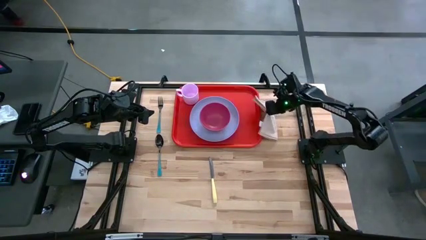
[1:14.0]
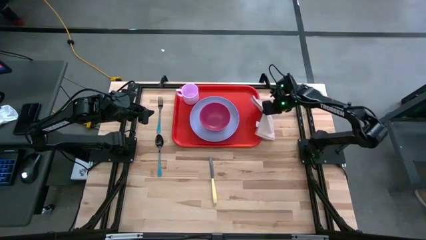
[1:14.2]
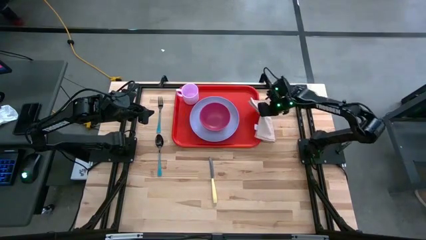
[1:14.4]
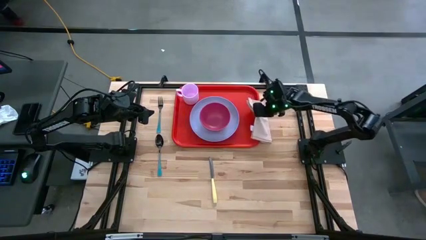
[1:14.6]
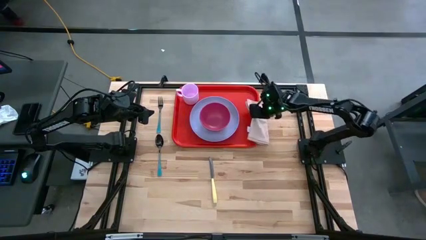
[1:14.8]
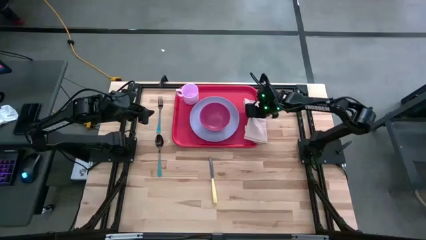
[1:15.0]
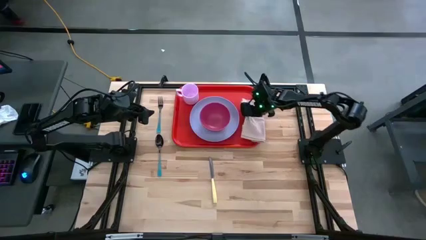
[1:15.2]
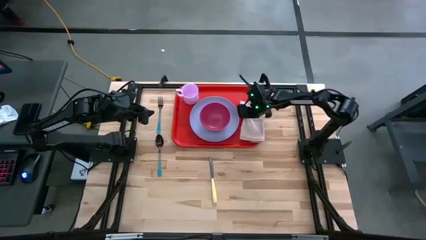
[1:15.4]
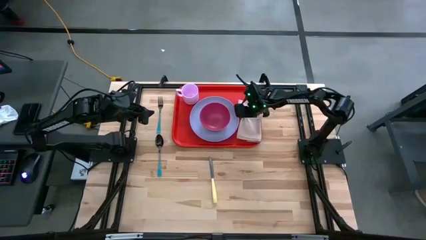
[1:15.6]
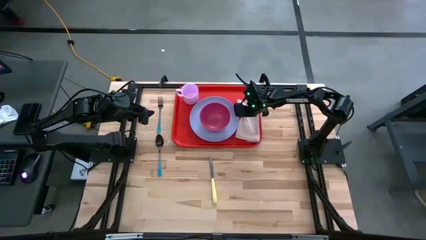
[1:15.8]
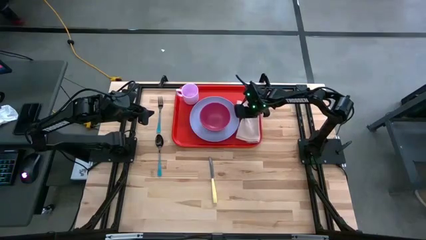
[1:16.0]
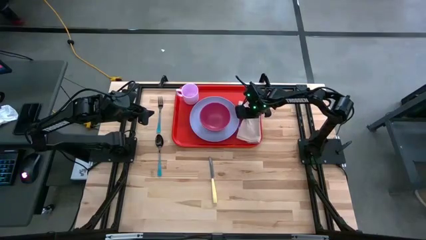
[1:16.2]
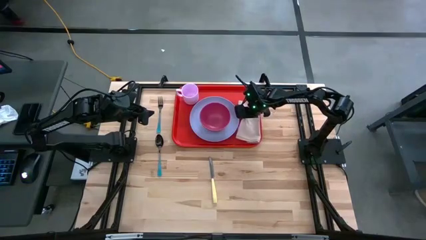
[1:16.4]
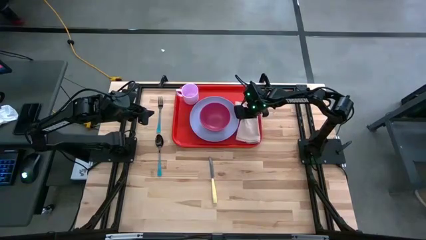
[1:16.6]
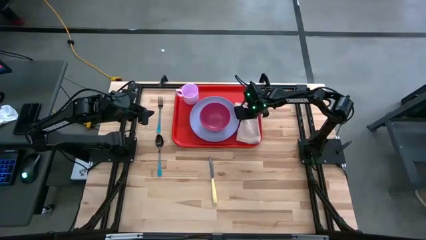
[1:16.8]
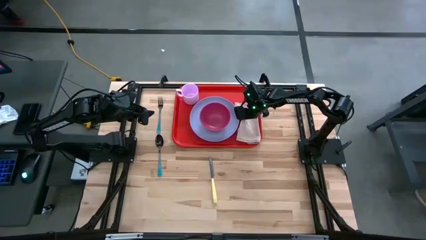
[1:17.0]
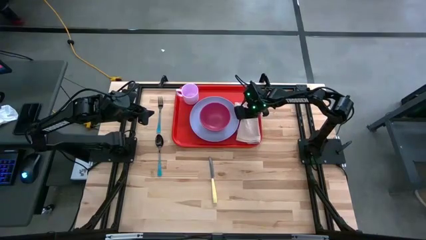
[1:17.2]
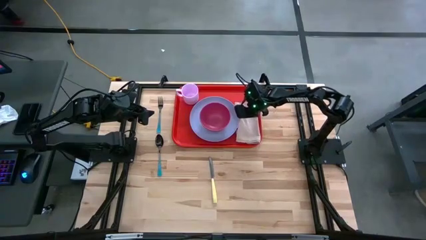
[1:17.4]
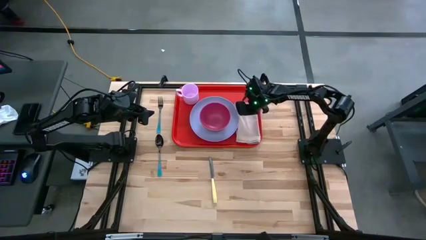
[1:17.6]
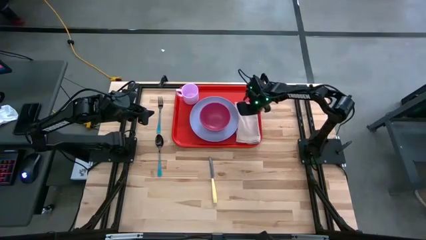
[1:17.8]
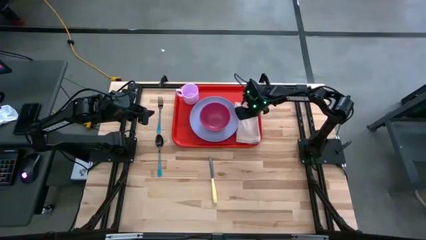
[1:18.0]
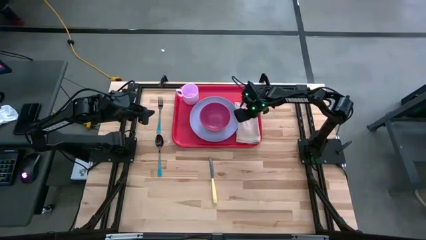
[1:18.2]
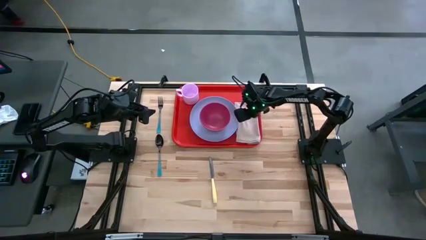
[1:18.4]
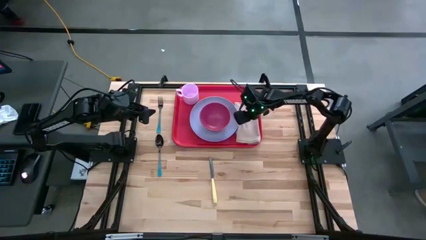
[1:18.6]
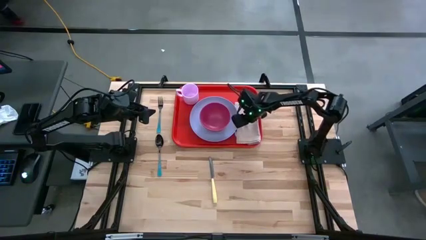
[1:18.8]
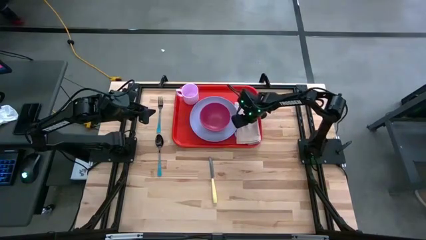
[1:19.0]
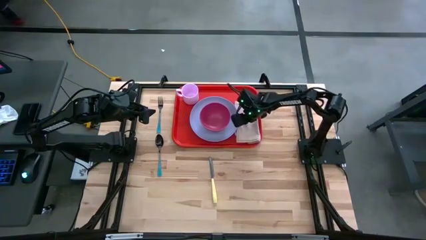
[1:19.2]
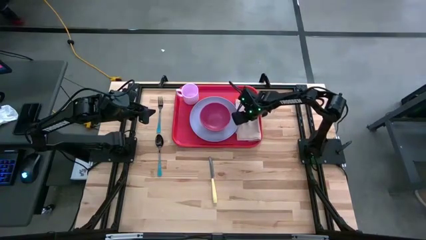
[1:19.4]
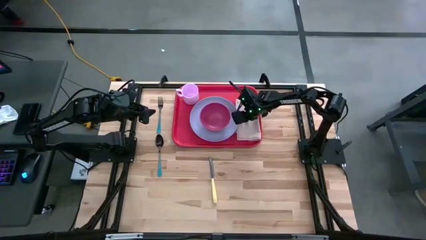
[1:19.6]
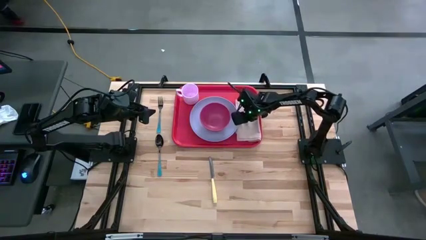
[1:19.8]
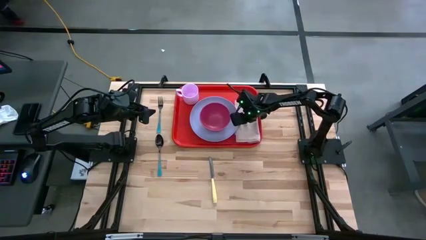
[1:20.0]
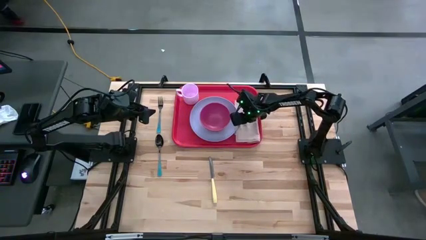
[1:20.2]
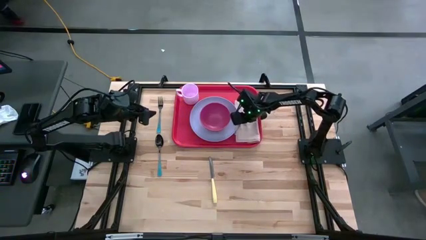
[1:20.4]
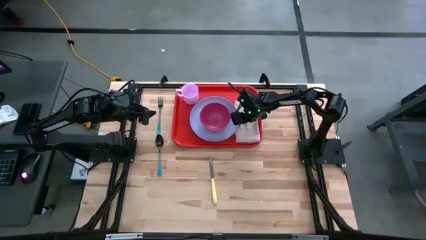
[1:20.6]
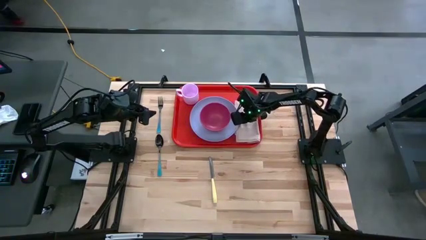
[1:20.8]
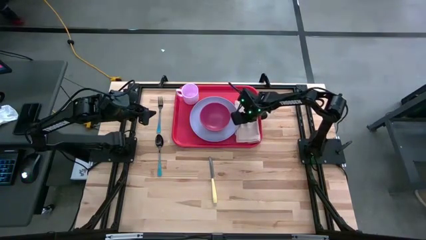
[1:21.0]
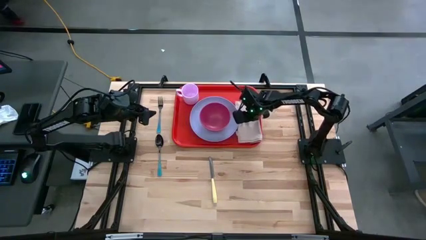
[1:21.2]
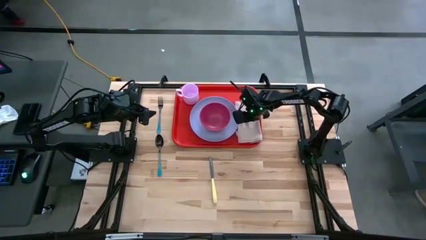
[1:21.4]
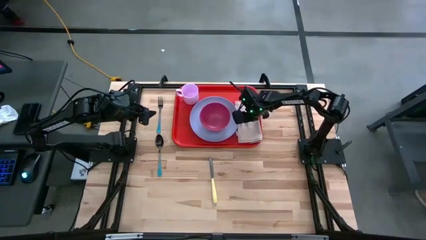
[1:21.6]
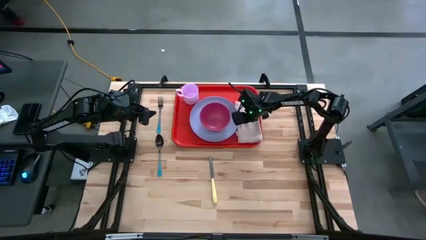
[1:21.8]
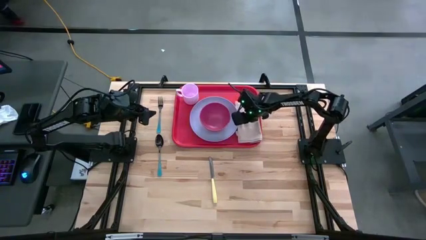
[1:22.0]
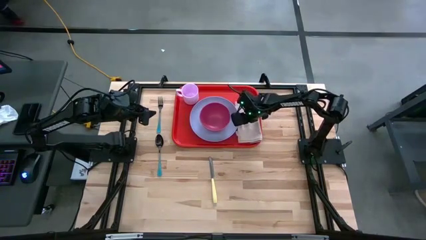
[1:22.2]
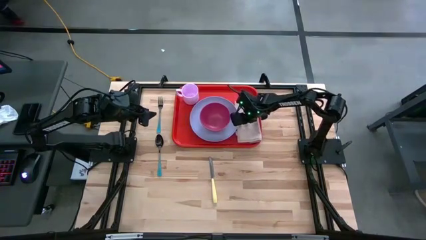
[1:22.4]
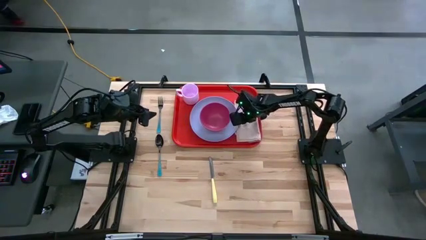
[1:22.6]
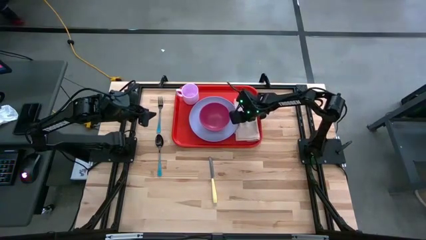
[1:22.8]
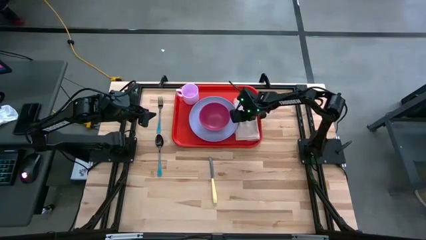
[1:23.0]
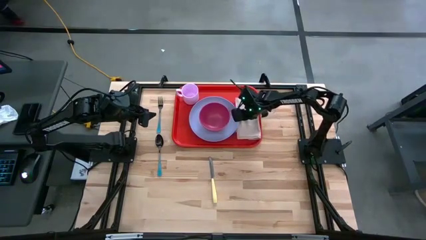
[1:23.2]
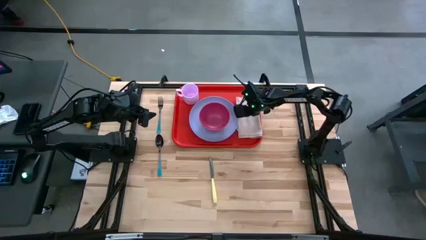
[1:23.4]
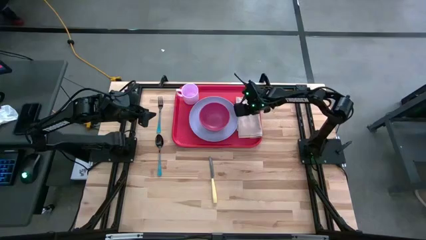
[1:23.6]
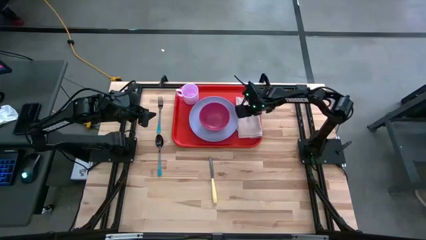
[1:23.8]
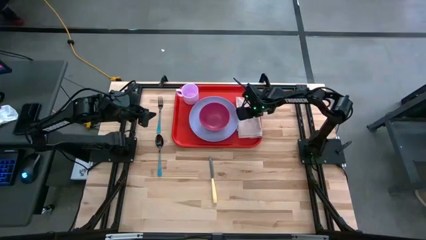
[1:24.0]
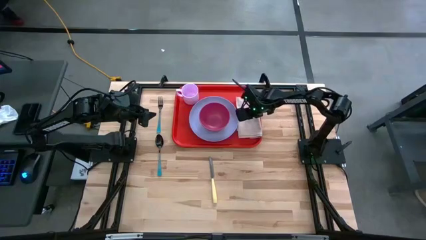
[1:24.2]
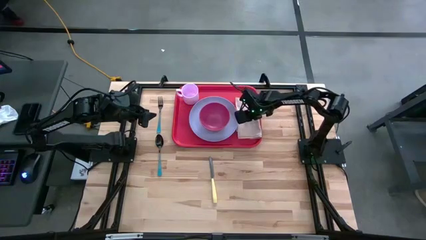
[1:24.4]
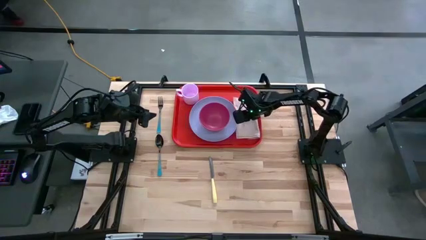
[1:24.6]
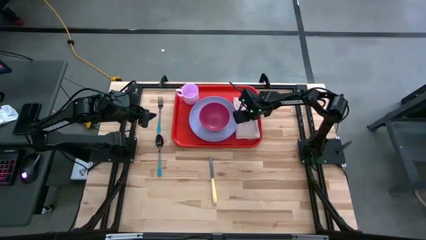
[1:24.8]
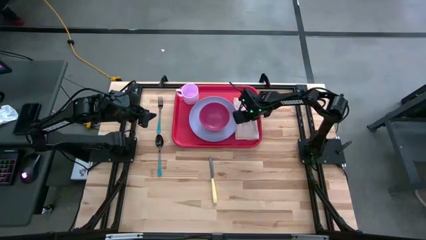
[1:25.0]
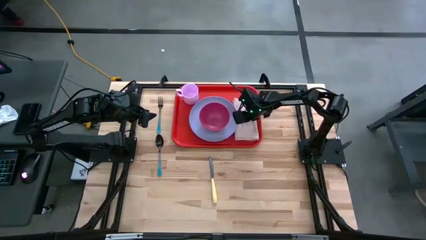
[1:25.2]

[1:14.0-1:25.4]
Task: Set up tray
Put the white napkin on the red tray to the left of the white plate

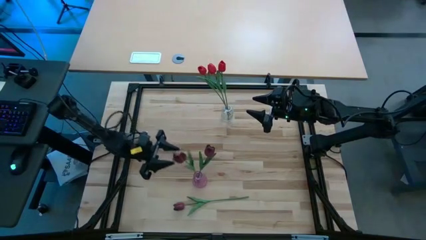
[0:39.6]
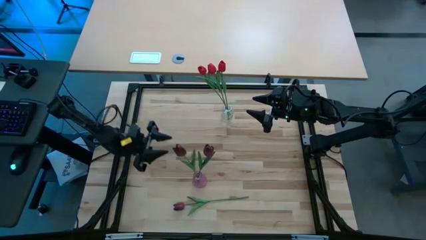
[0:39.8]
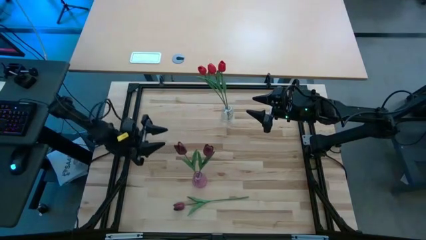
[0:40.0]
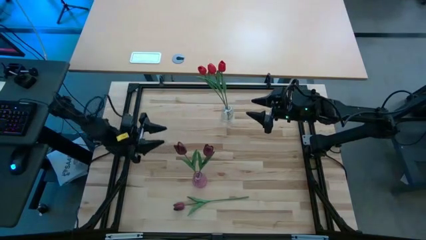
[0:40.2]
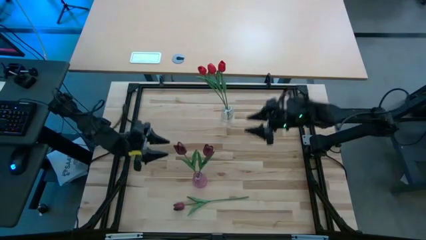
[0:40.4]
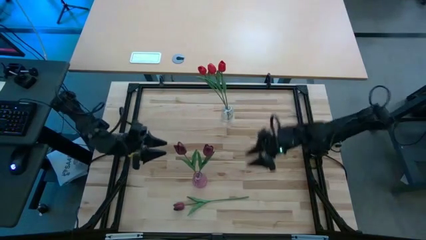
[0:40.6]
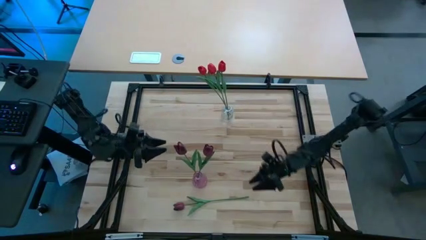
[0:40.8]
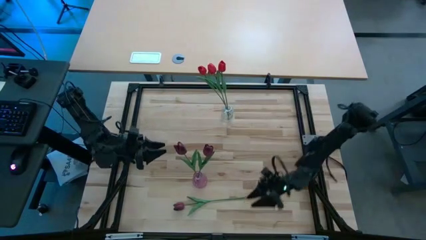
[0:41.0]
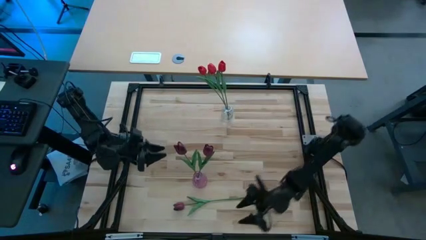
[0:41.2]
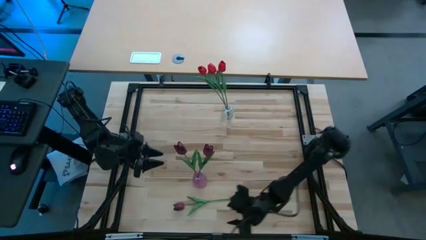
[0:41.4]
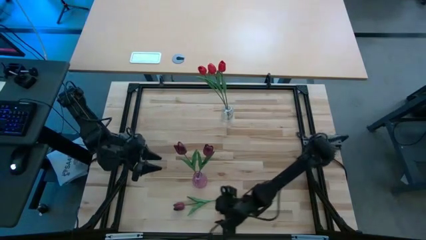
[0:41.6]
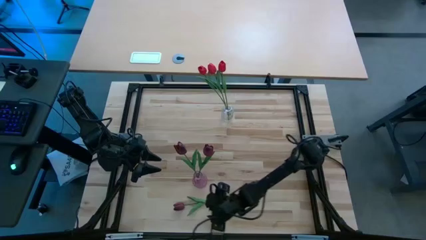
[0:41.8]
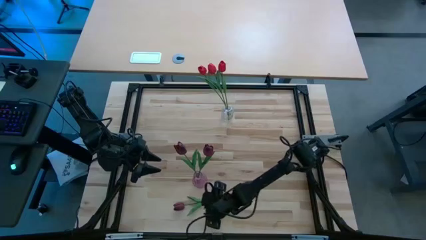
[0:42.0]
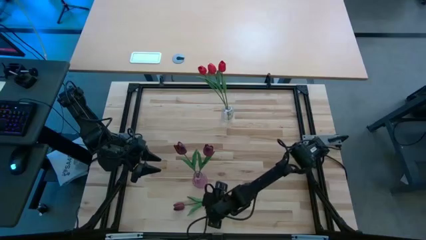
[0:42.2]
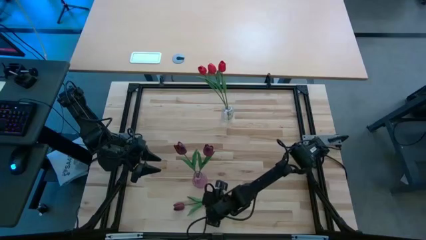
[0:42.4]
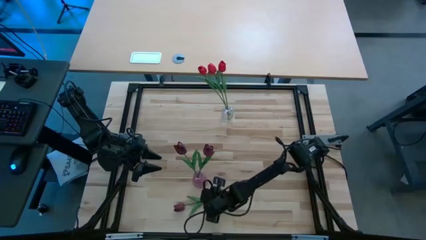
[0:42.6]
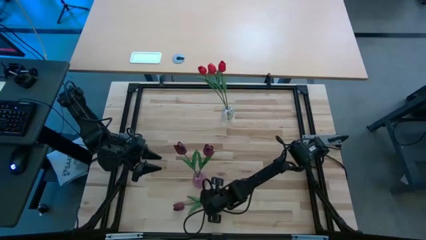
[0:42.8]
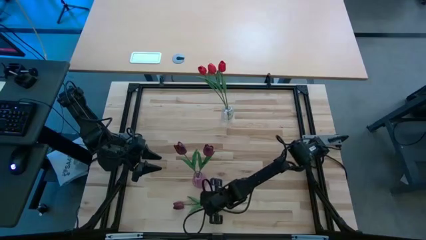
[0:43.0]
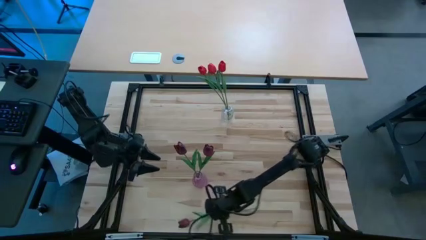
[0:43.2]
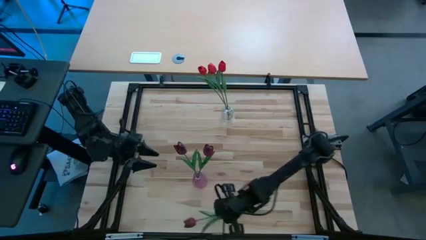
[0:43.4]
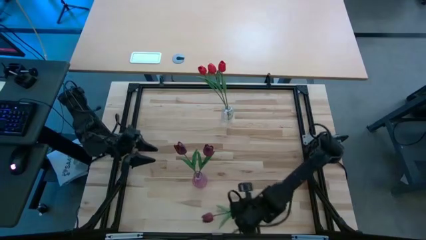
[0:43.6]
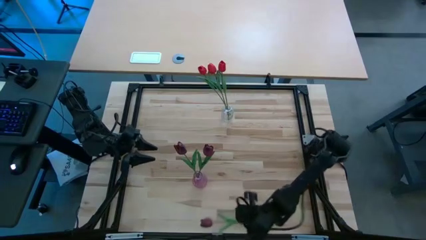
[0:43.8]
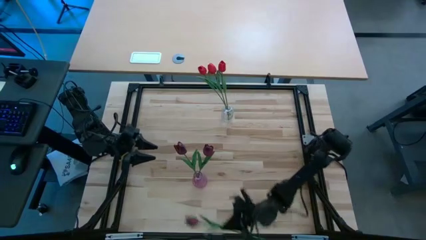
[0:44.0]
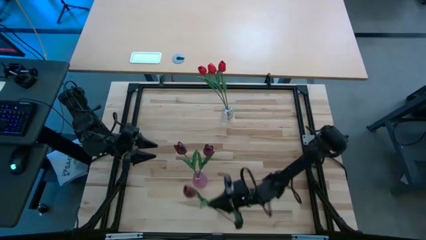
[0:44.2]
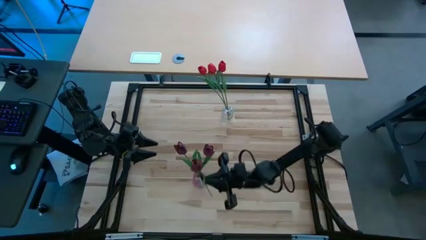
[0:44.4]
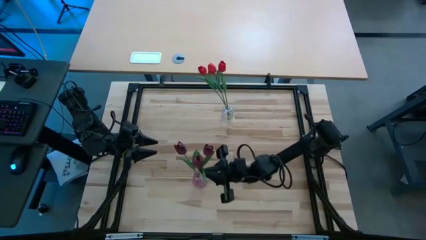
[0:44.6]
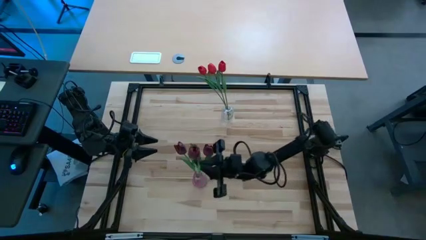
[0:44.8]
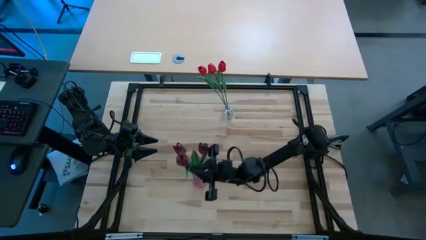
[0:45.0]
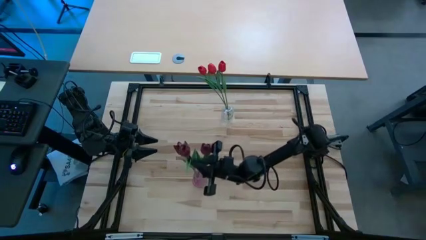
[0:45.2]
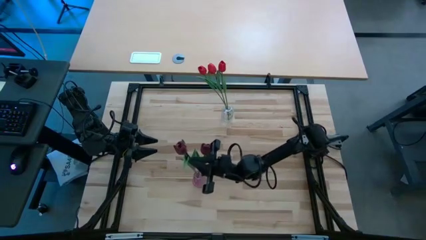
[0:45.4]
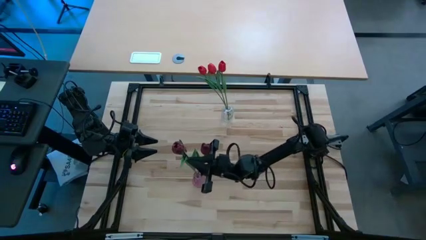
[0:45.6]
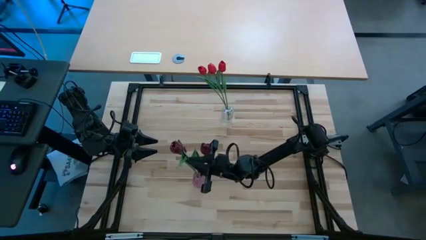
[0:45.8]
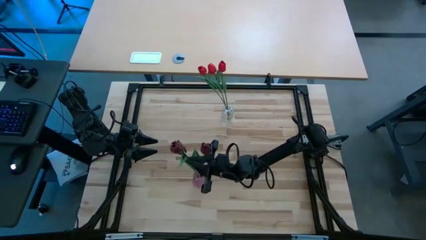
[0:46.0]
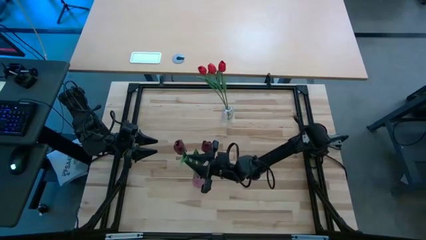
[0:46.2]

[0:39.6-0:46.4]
Task: Sort flowers into vase by color
Put the dark red tulip into the violet flower vase
